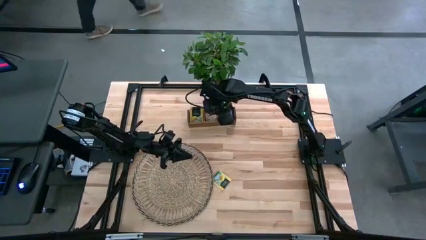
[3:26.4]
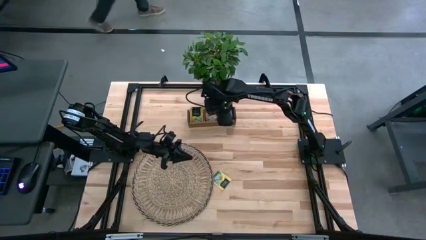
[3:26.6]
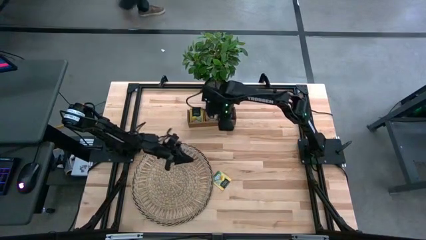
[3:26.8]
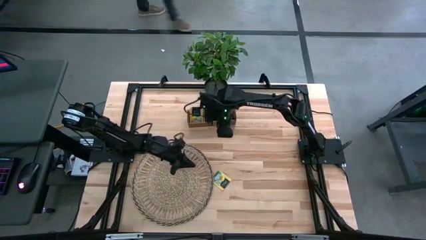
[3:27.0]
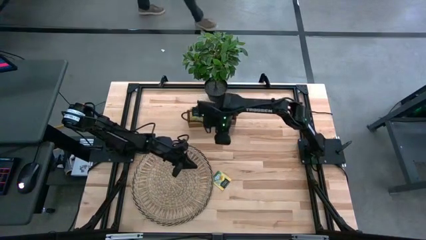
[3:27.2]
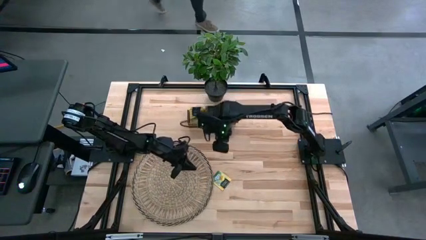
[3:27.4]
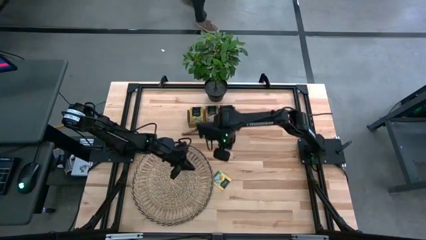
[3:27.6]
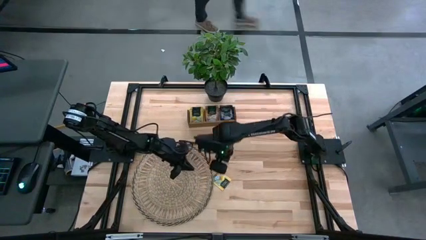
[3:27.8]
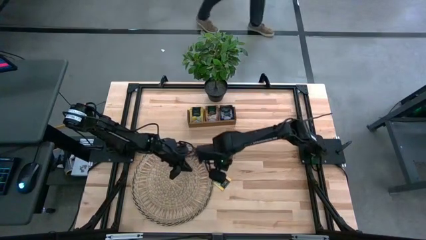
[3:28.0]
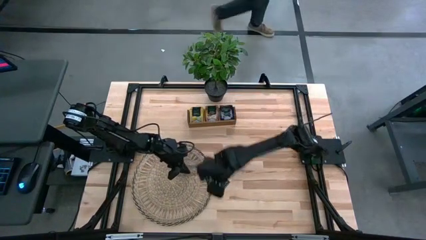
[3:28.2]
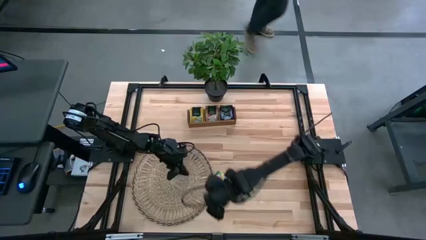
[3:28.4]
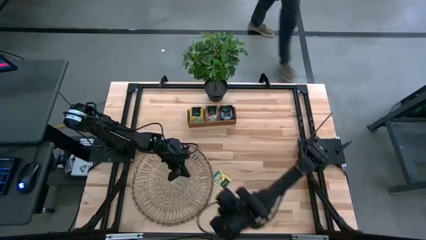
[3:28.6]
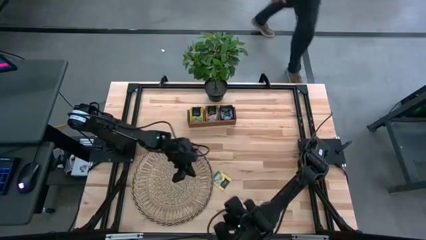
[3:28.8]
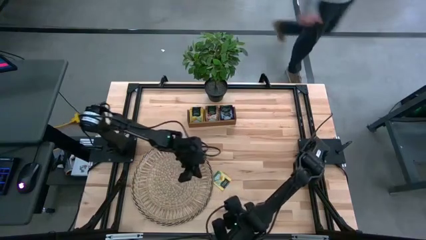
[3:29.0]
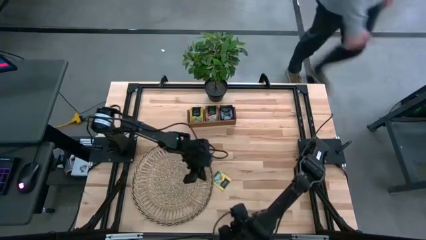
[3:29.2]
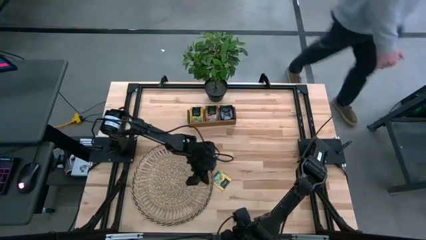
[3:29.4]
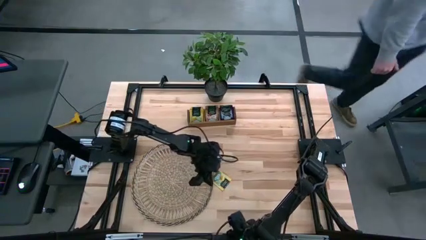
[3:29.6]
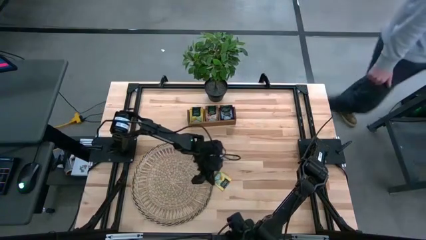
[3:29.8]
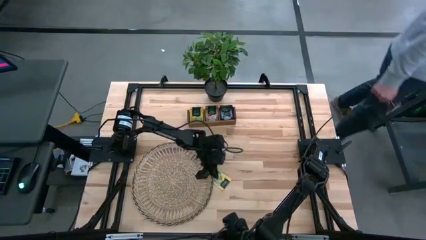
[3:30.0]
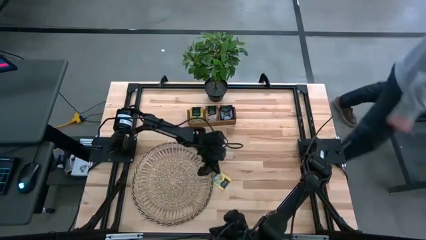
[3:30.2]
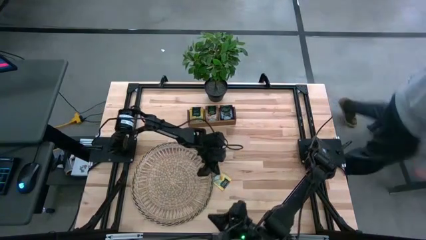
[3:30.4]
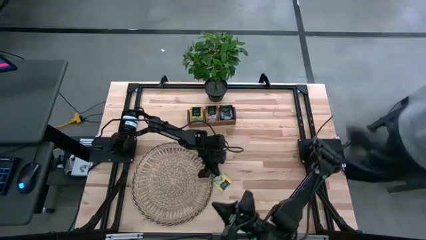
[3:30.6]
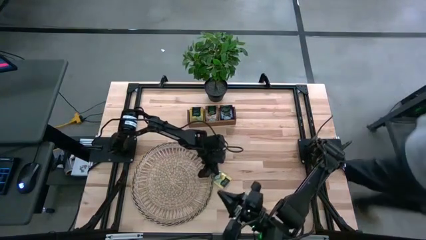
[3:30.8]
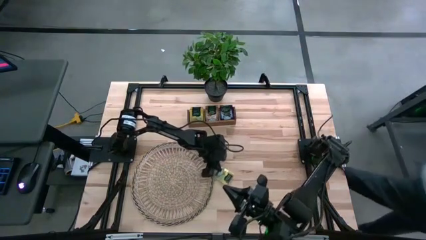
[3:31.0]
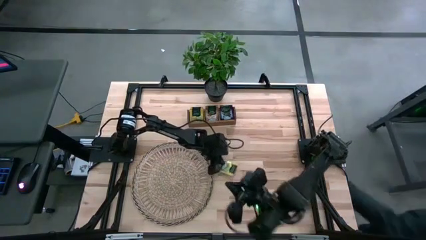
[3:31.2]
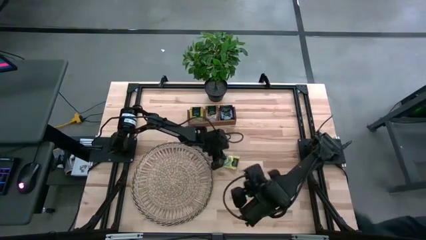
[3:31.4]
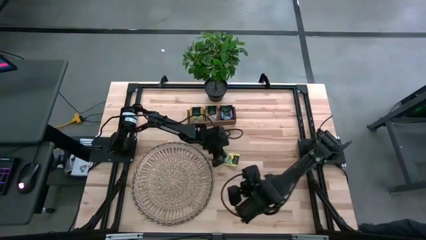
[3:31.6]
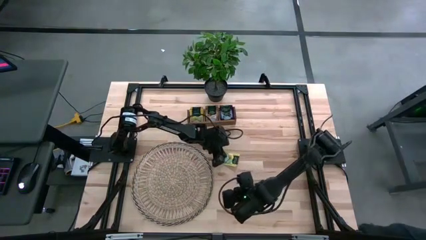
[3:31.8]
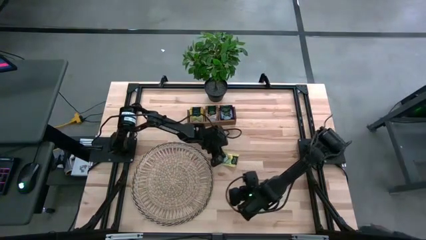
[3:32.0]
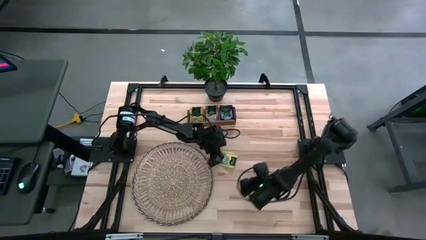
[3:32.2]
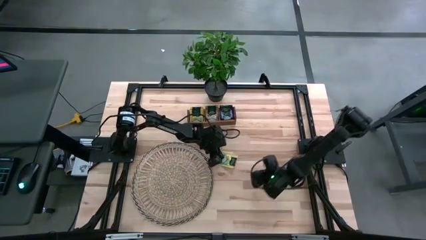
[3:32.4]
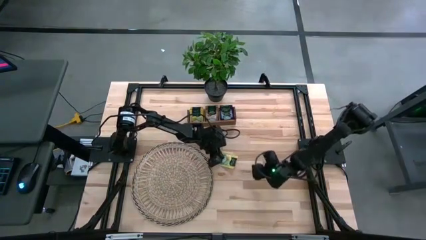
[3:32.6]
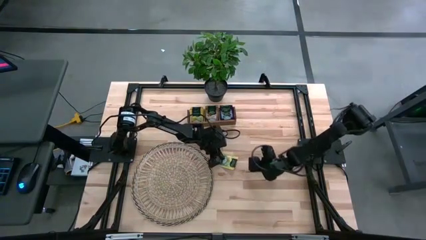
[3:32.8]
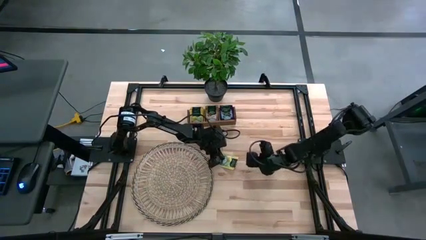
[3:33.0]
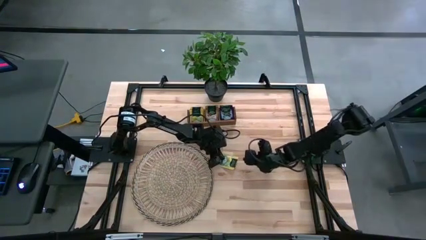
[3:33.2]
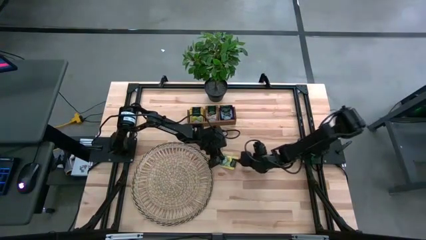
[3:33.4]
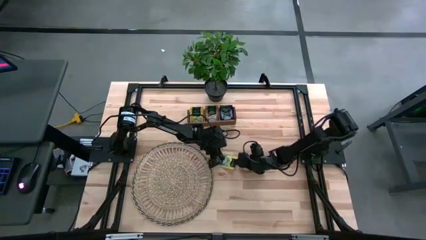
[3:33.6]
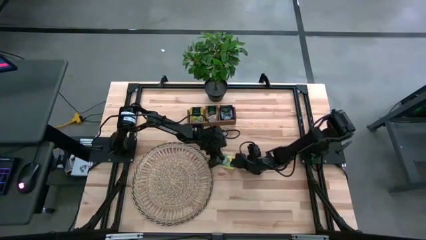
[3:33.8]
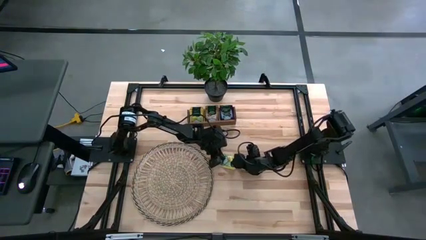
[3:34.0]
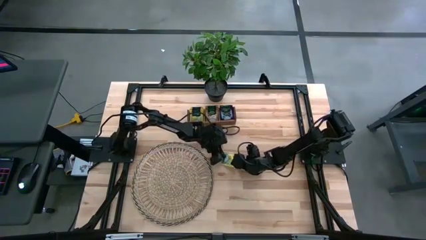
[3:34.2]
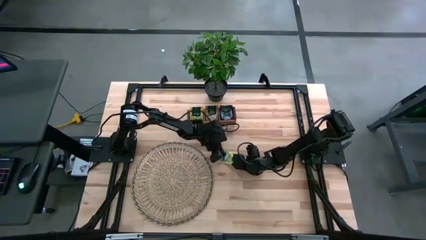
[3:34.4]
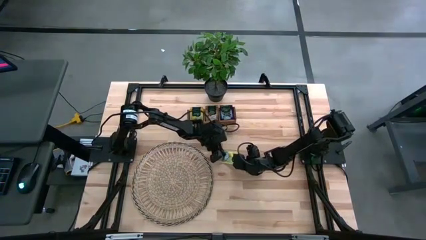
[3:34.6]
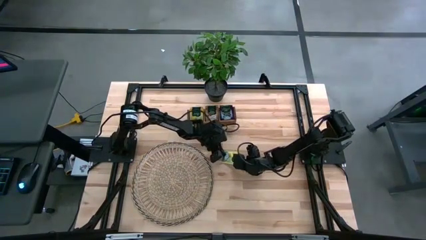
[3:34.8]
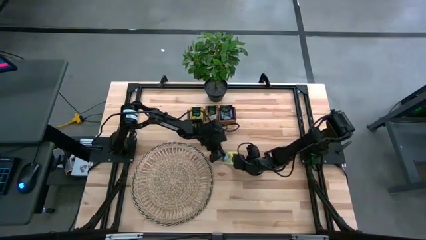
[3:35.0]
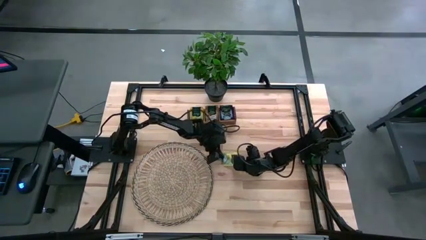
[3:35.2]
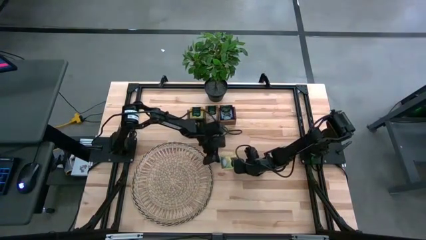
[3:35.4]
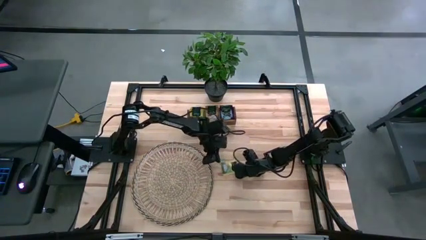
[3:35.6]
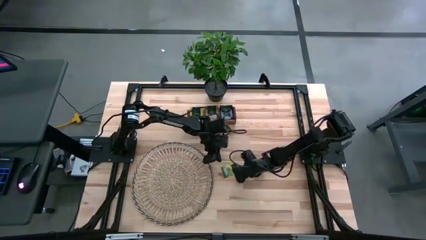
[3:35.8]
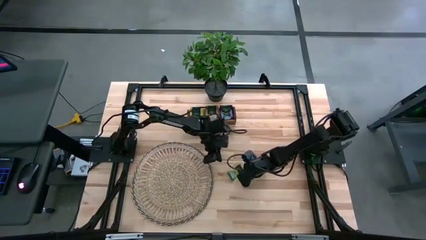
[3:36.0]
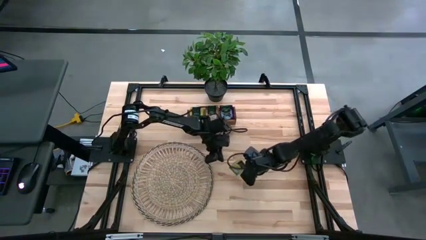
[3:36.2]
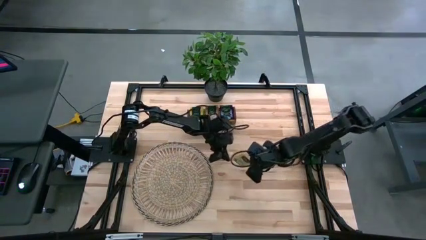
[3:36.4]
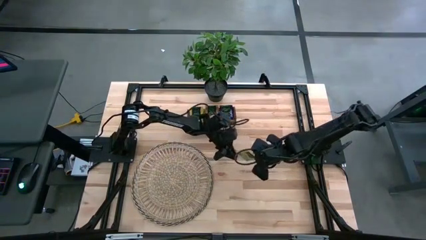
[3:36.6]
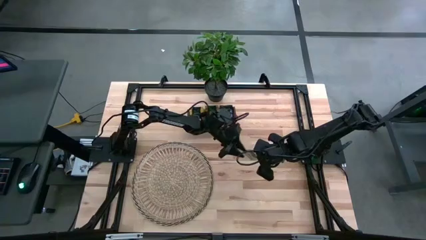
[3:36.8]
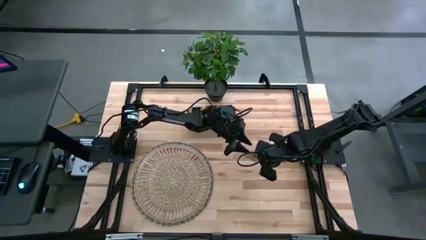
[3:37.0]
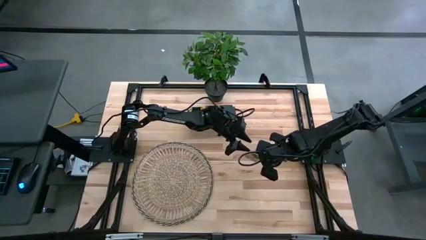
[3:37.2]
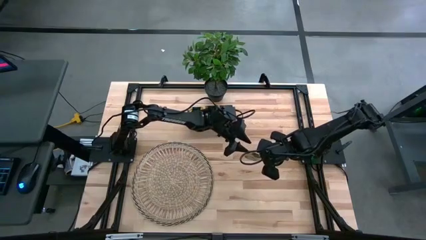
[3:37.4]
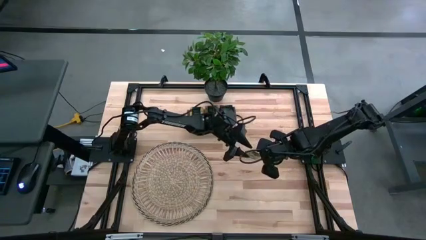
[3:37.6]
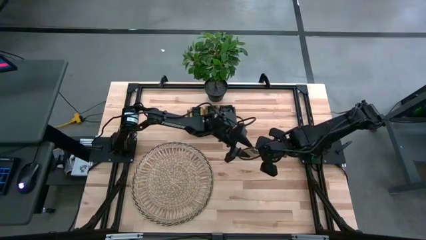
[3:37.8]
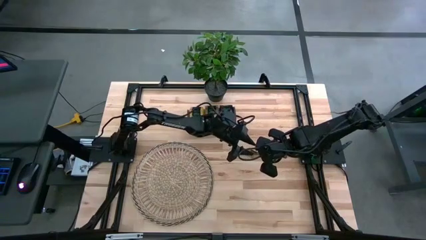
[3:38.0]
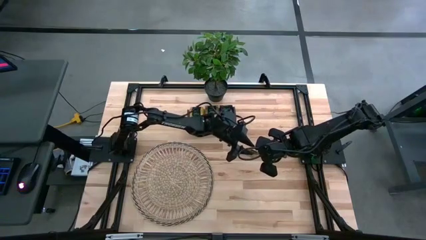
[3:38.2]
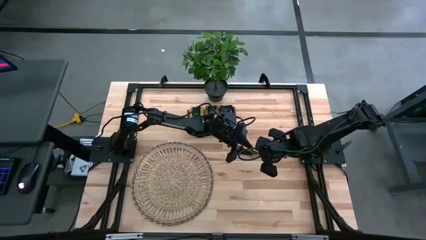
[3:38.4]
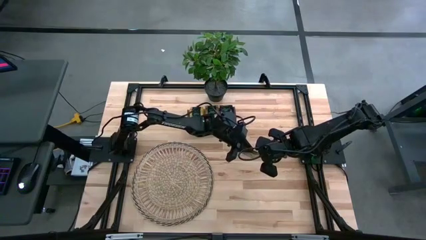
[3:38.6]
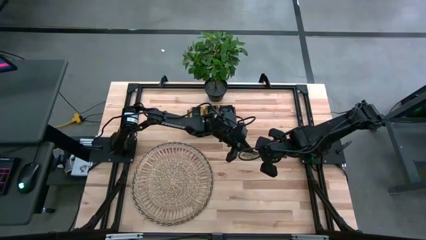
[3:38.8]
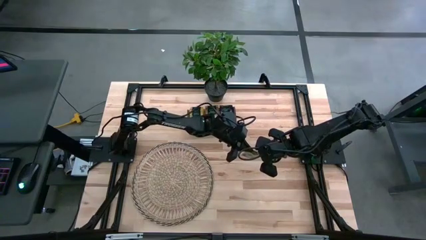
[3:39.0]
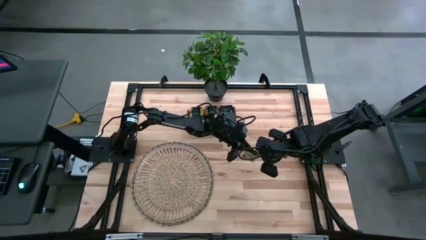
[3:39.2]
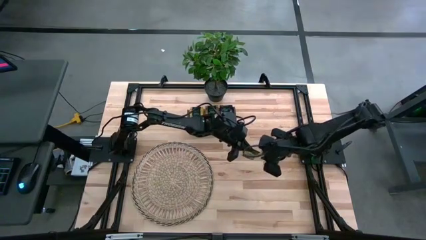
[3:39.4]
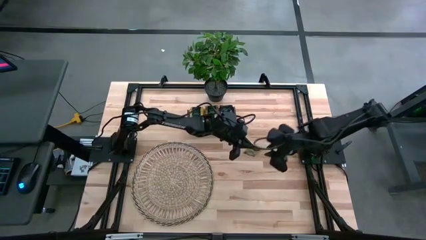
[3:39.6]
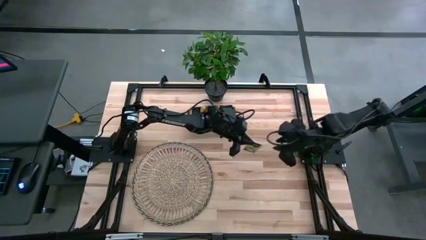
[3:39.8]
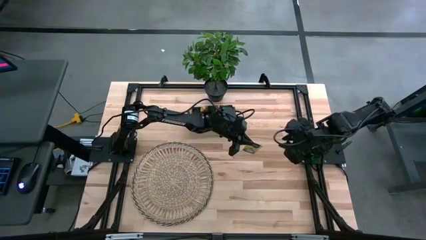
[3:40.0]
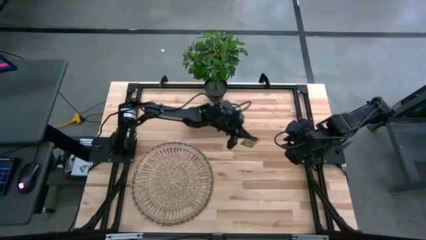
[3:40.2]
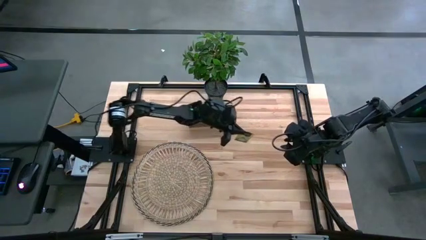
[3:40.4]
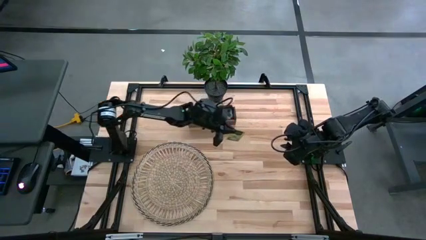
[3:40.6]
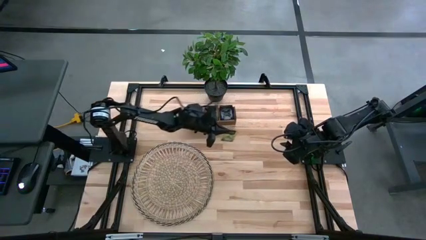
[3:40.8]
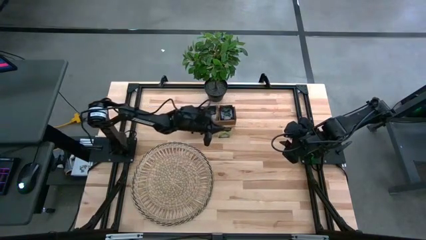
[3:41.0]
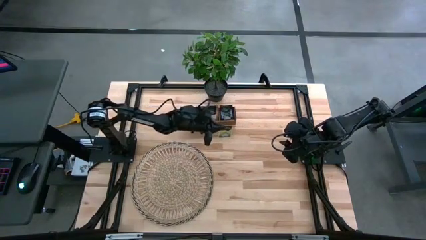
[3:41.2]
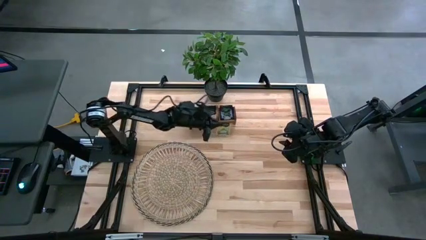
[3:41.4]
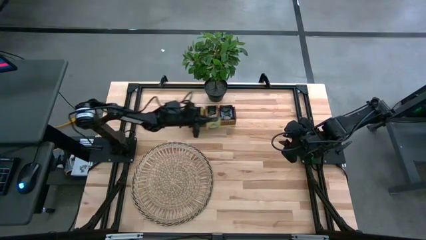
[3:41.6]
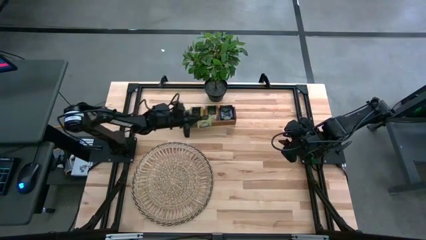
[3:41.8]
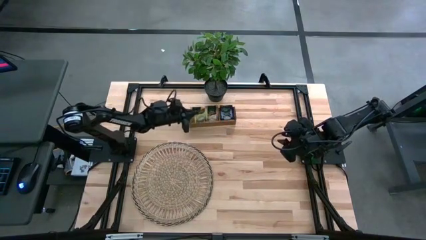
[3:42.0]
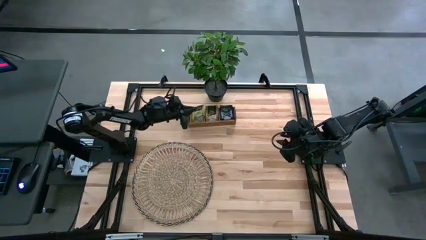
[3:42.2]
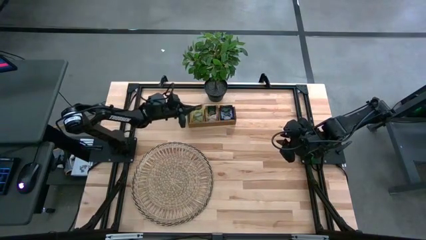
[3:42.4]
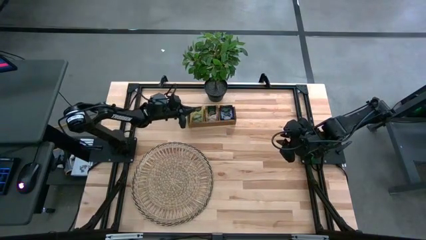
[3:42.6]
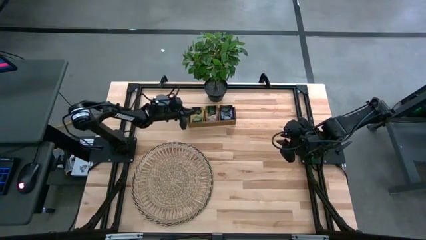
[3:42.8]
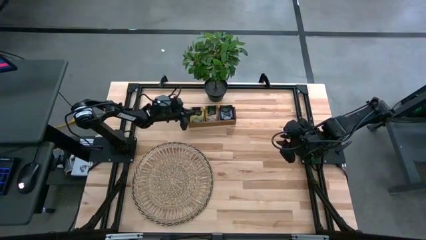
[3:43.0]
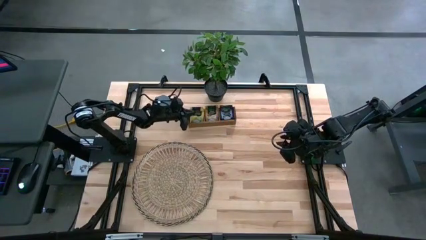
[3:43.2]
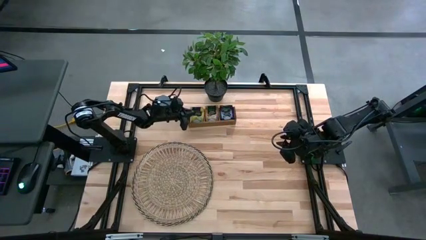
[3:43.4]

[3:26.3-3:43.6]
Task: Pick & Place Tea
Put the yellow tea bag into the left section of the wooden organizer
